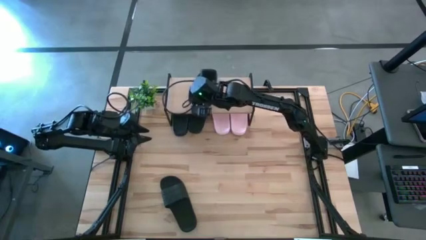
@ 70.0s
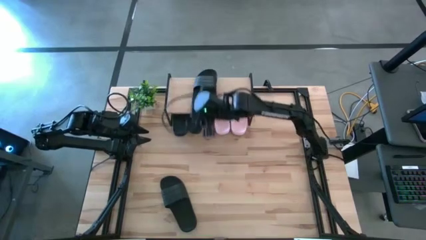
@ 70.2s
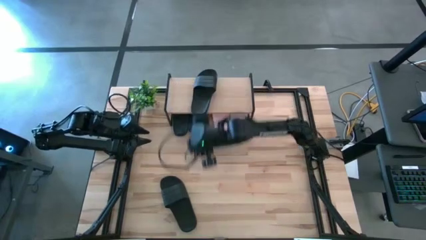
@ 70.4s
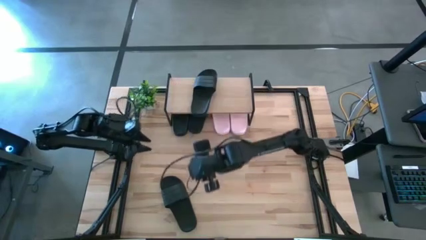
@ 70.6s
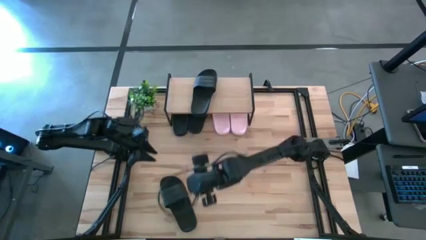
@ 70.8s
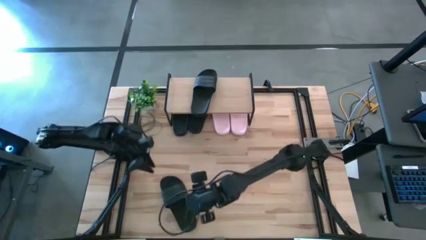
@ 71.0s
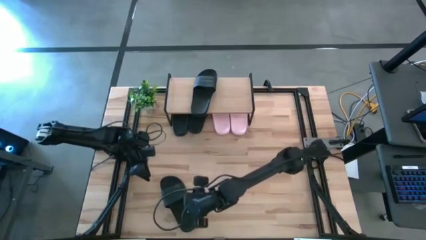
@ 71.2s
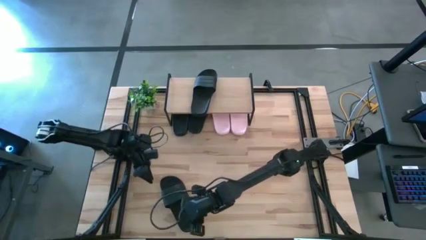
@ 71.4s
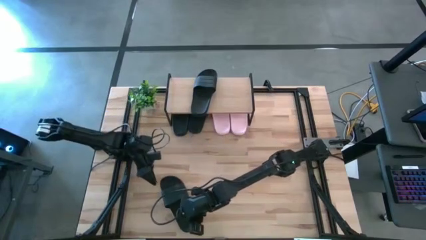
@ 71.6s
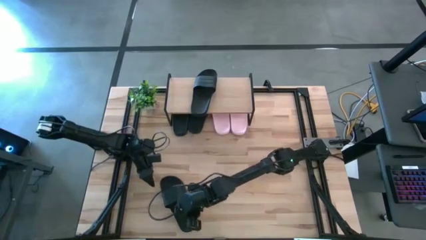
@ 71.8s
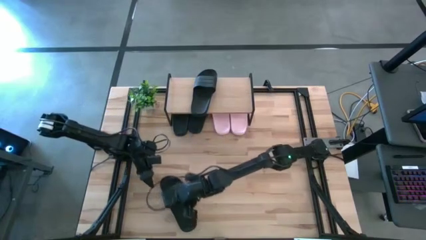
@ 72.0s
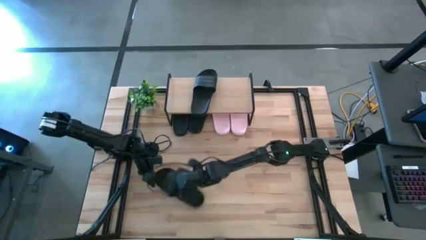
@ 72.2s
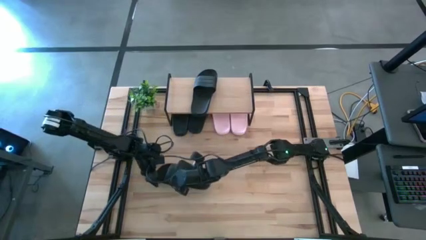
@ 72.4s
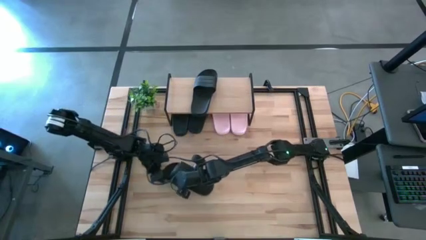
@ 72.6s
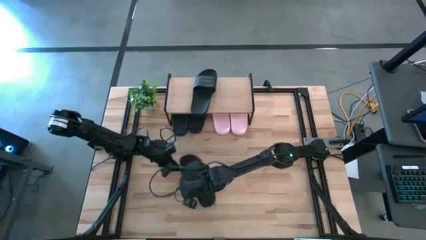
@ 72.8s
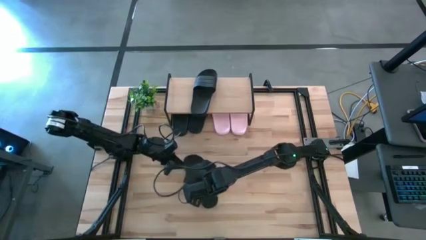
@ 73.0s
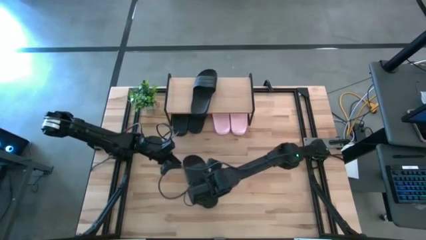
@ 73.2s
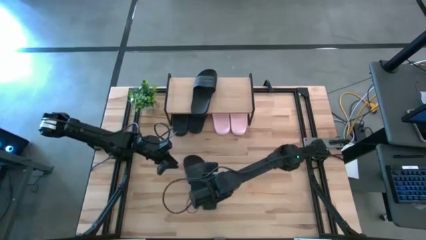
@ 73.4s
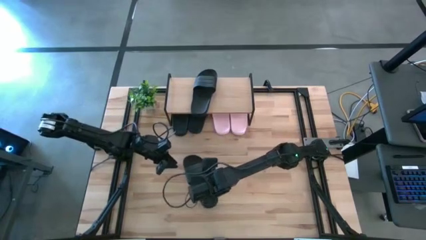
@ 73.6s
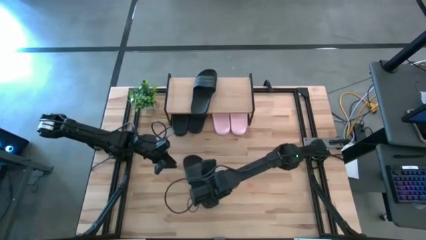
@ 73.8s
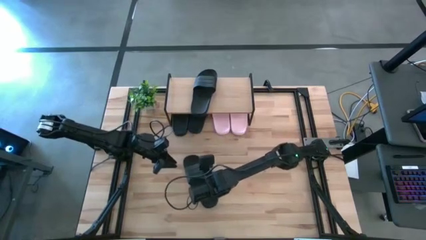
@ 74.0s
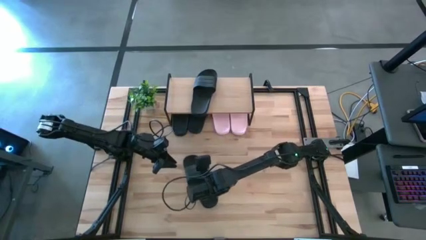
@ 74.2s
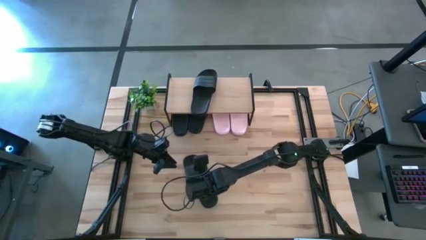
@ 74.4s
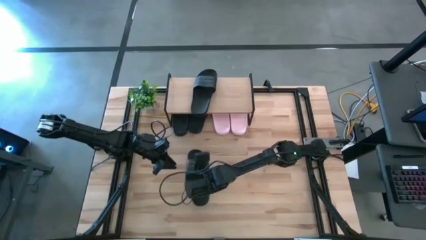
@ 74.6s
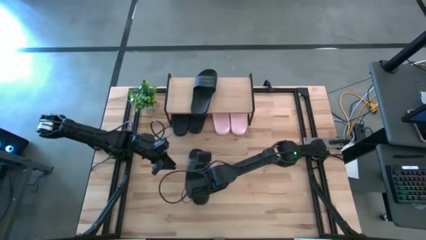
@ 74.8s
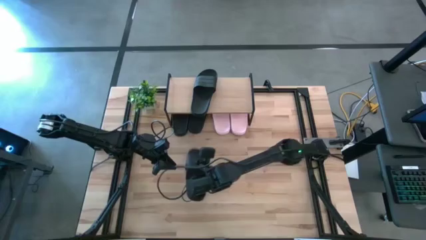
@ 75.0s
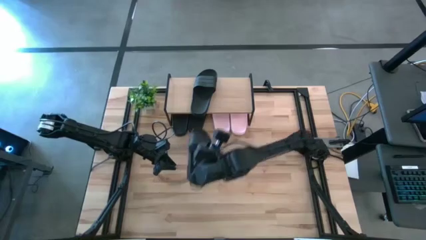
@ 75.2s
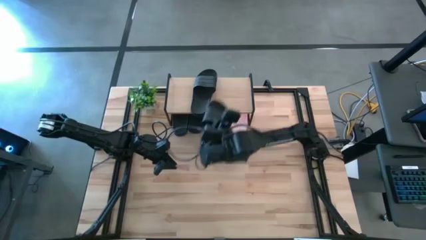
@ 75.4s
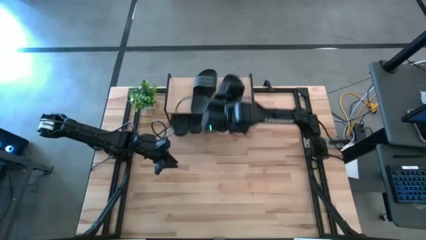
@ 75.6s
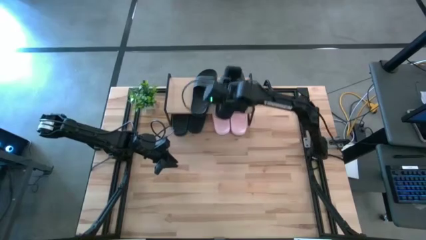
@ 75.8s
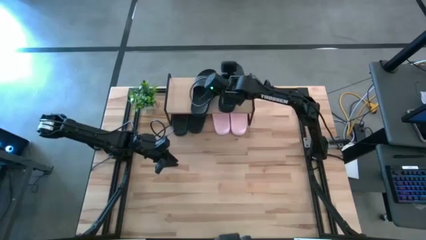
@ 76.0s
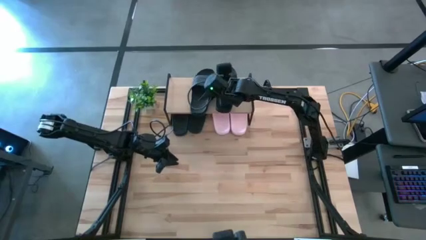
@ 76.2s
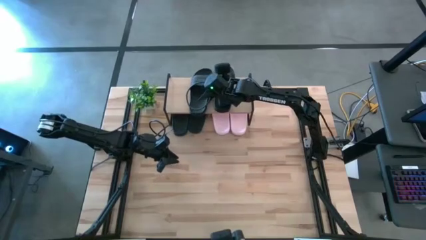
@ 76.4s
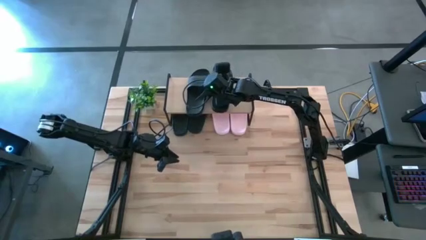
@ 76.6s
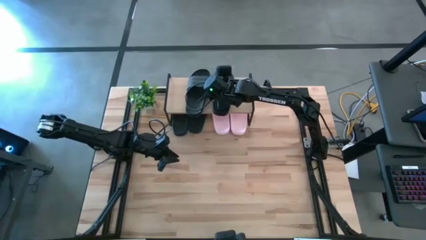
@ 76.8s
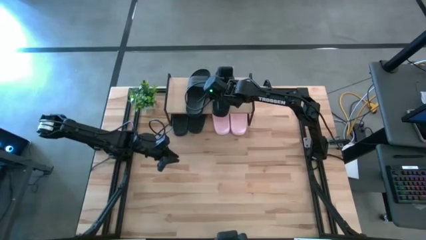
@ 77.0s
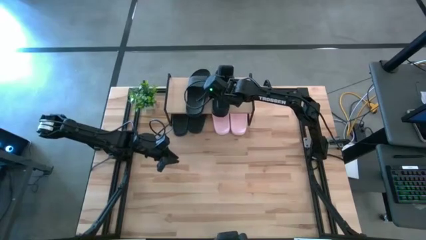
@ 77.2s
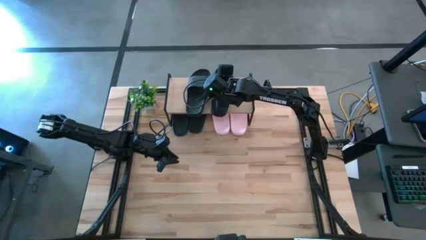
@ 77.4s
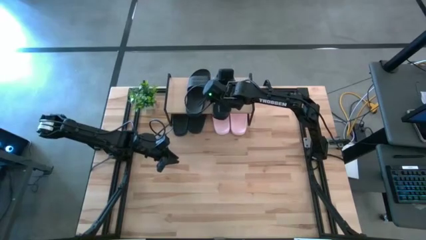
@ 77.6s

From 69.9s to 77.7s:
Task: Pick and place slides into the shelf
Put the black slipper on the shelf

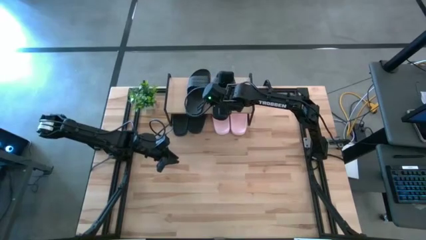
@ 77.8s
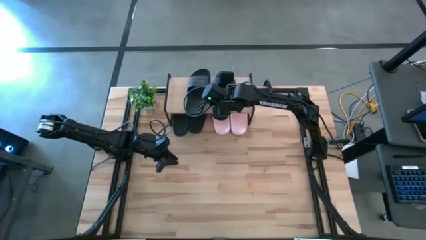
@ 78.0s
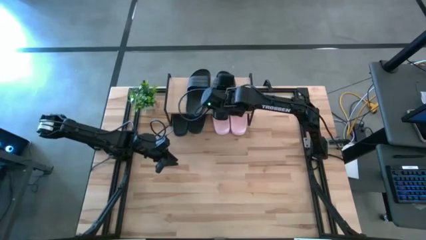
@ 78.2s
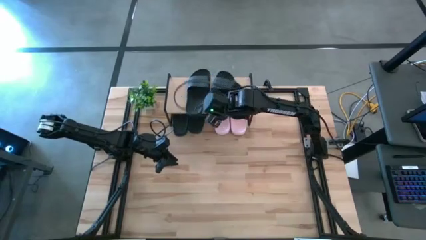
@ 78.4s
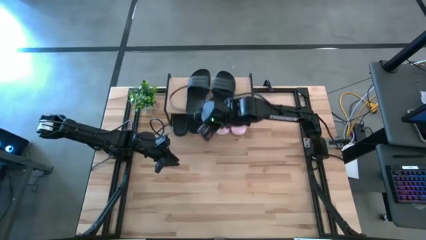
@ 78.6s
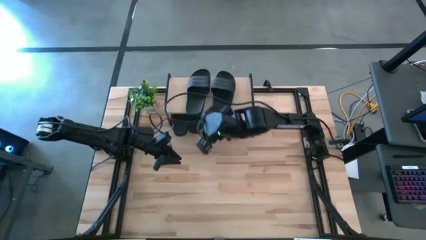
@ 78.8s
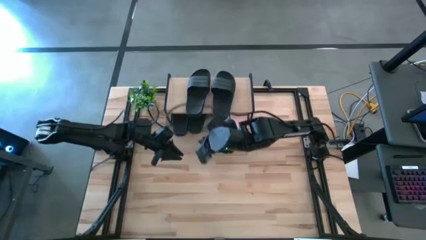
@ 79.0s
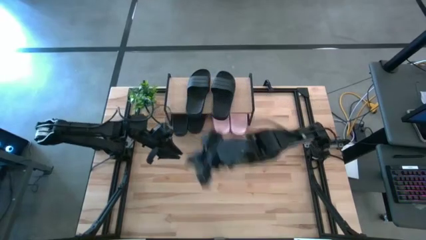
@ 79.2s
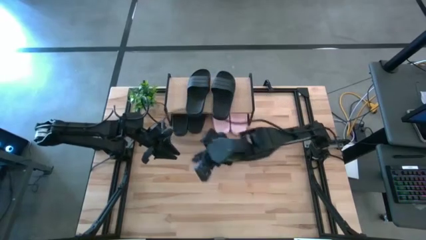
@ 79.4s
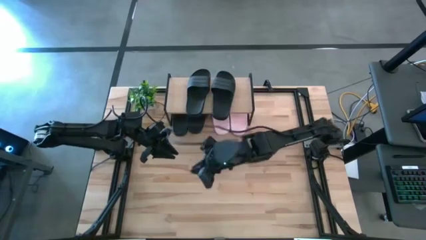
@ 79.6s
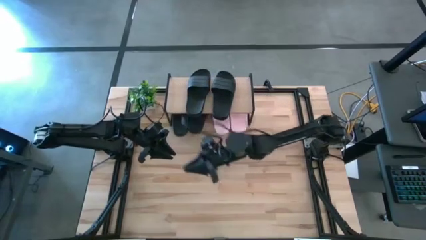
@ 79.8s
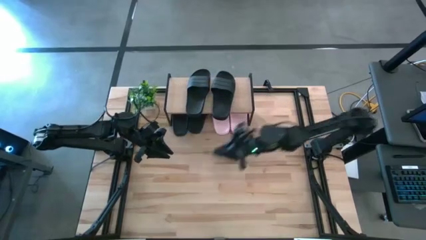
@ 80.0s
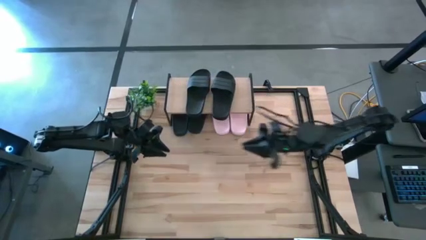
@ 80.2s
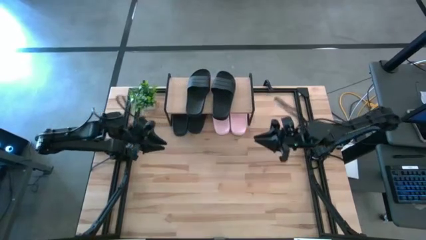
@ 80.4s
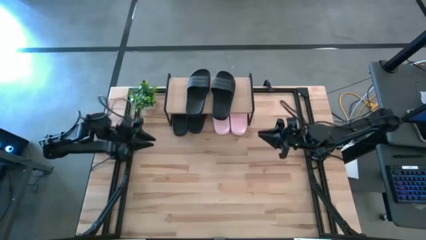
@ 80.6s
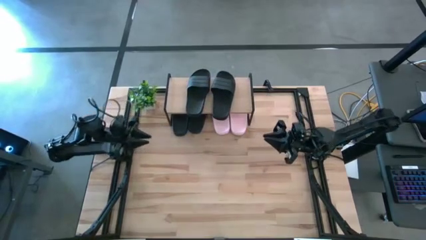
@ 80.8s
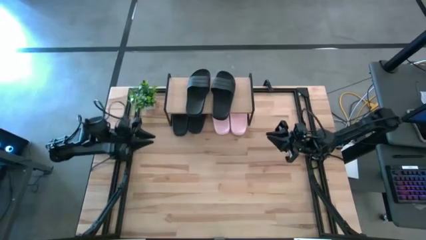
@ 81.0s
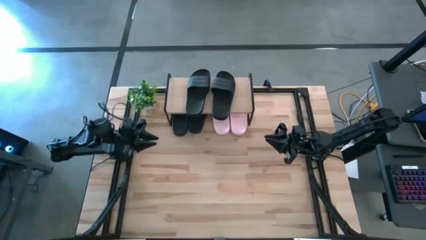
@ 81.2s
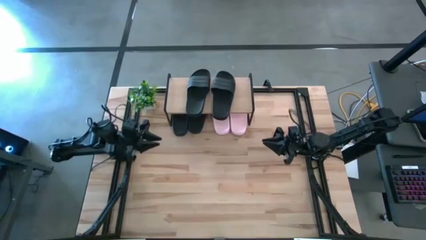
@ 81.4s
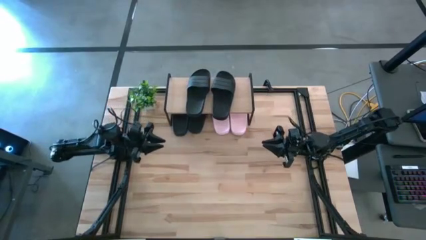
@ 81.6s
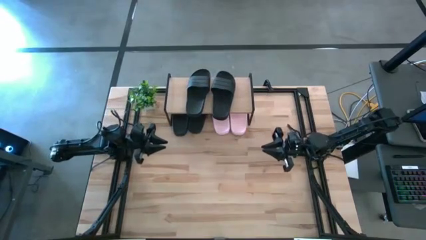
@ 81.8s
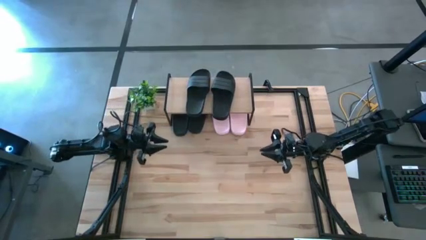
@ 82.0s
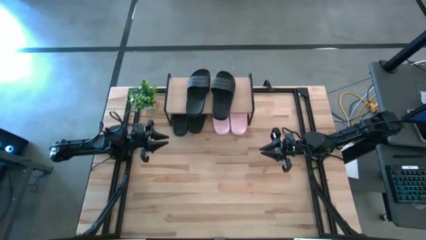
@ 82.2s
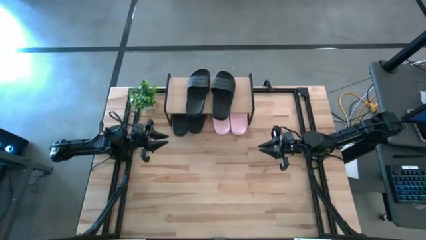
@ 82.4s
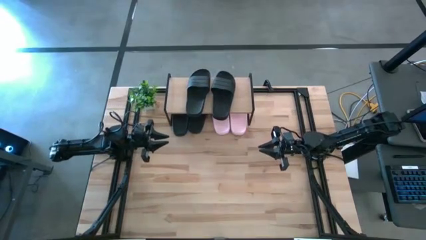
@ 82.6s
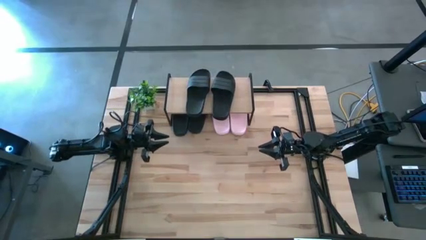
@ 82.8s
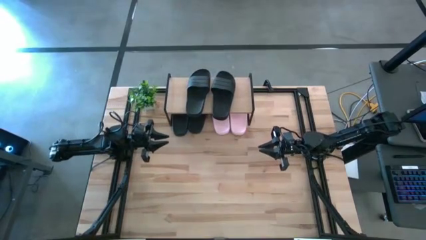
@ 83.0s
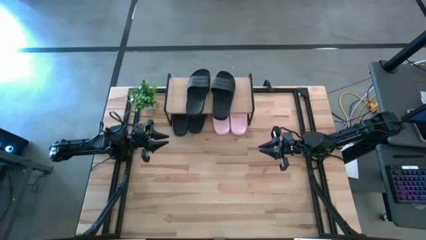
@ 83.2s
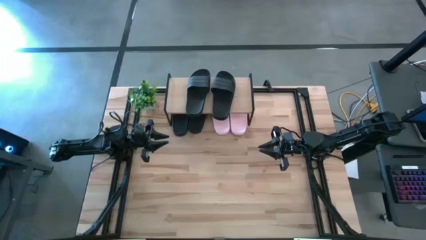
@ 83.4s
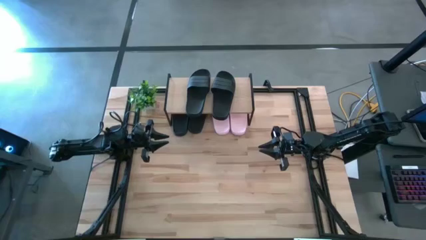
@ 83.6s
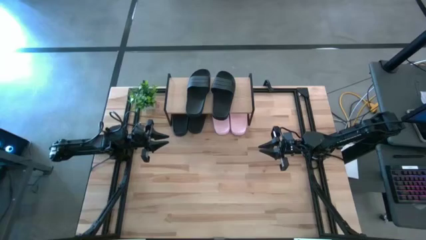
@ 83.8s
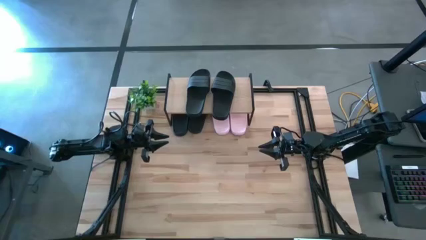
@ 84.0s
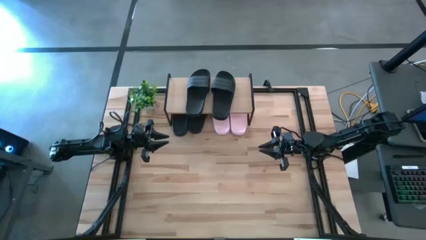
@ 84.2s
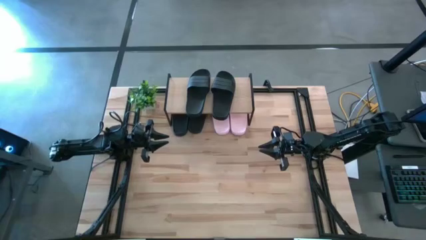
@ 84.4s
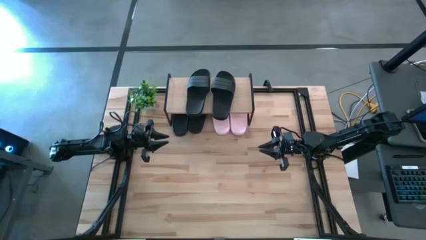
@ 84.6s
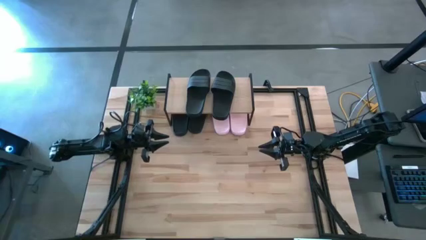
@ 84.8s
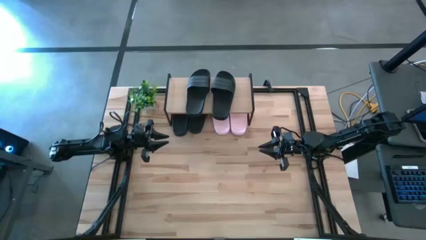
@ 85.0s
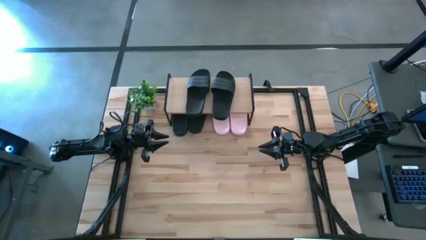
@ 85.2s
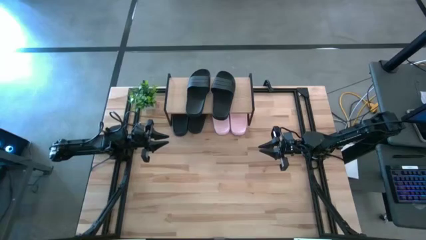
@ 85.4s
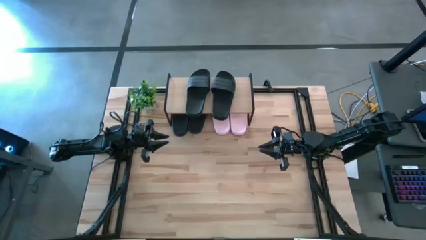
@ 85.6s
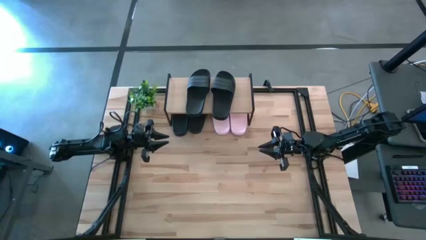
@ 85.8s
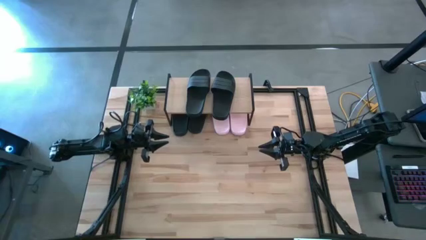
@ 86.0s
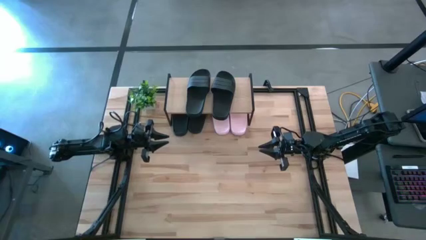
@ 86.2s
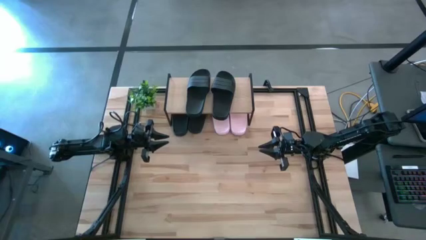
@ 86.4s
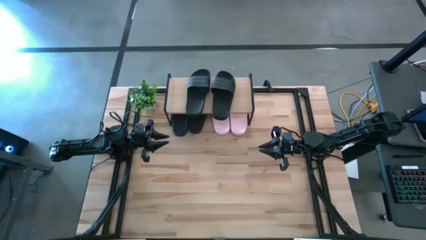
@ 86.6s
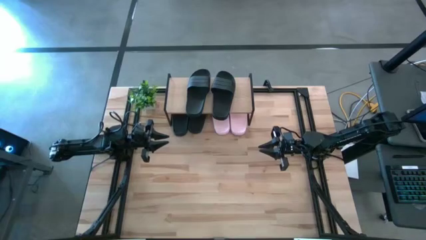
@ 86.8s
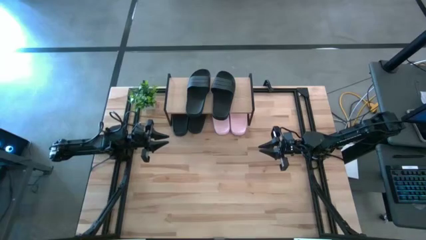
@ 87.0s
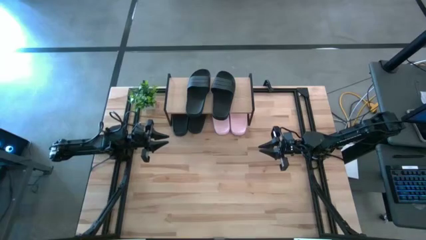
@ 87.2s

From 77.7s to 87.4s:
Return to Home Position
